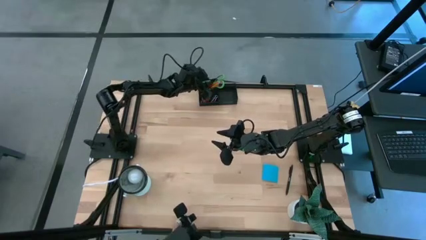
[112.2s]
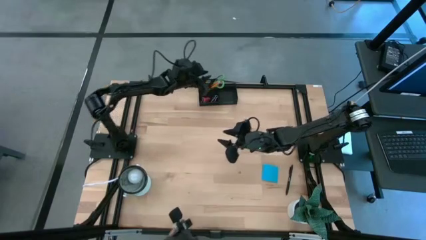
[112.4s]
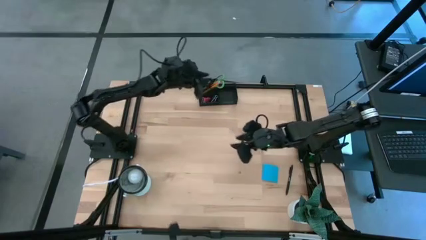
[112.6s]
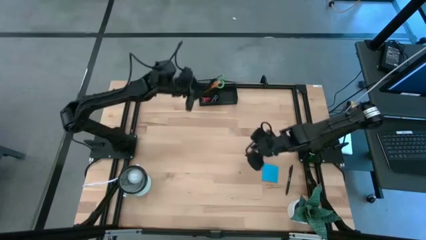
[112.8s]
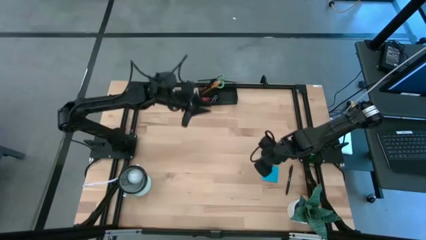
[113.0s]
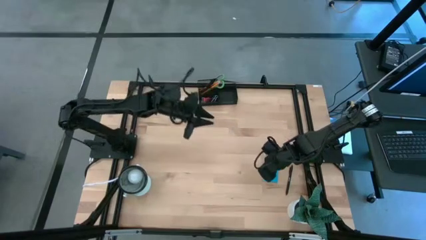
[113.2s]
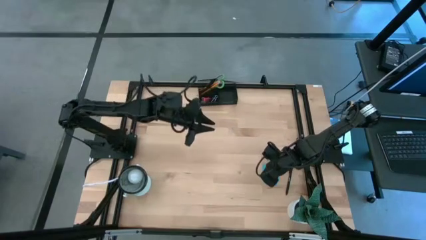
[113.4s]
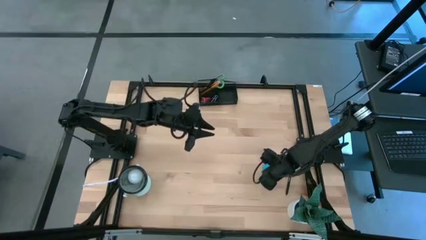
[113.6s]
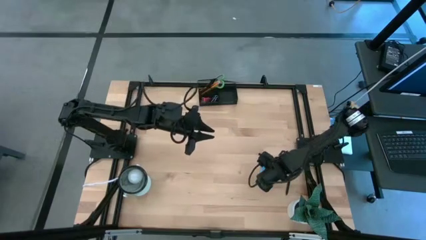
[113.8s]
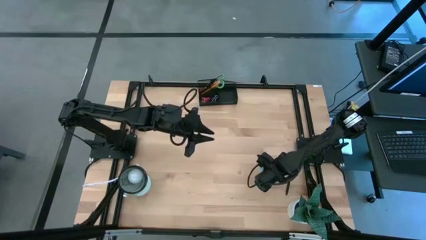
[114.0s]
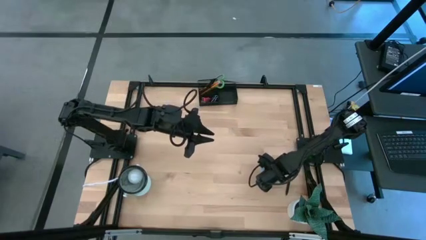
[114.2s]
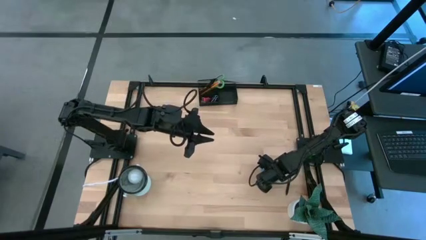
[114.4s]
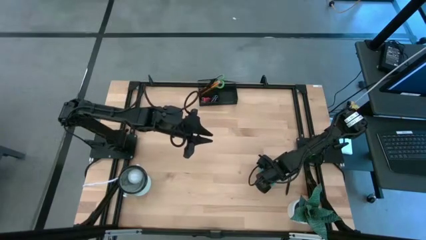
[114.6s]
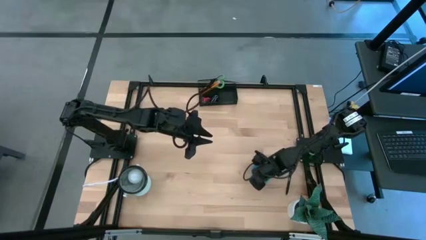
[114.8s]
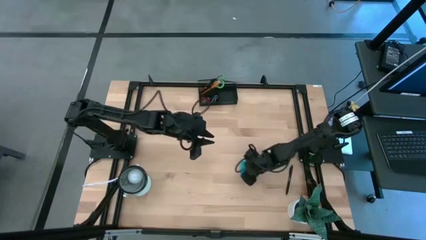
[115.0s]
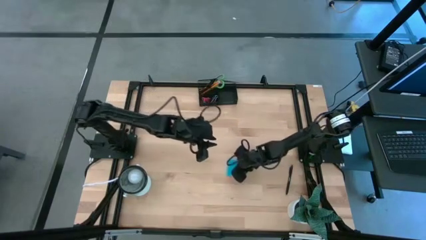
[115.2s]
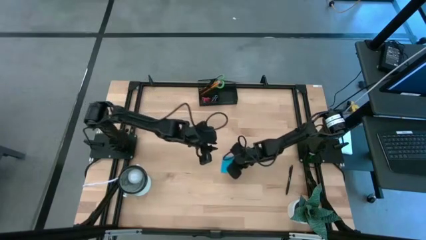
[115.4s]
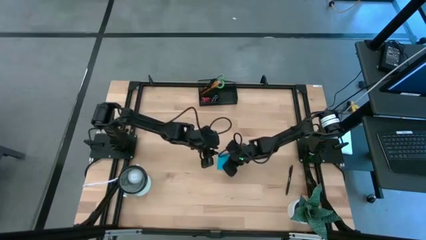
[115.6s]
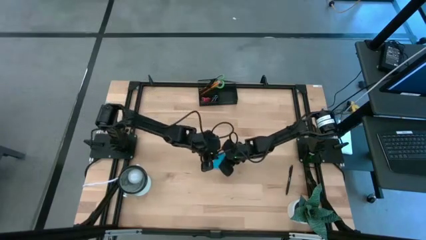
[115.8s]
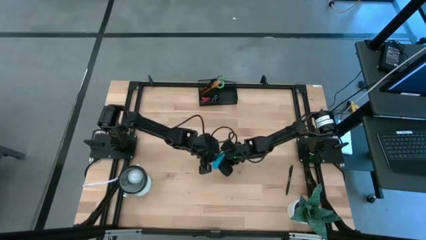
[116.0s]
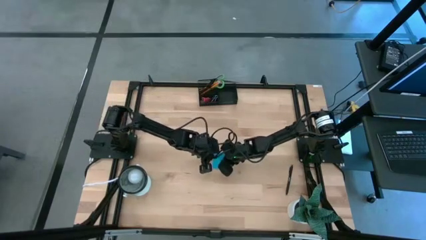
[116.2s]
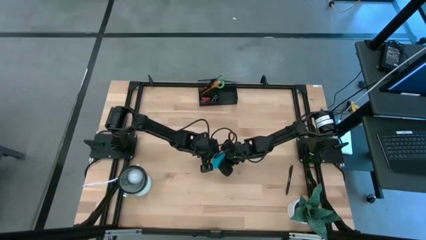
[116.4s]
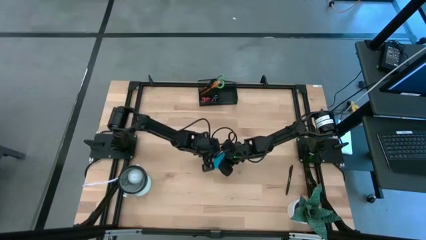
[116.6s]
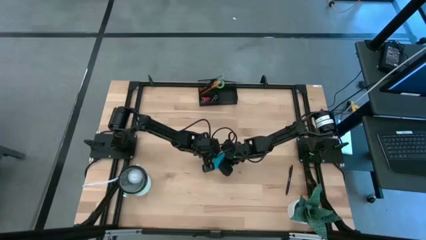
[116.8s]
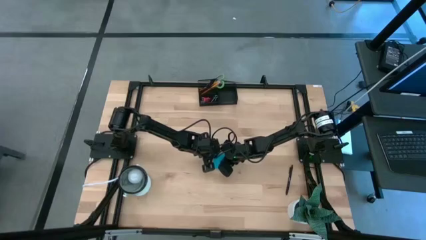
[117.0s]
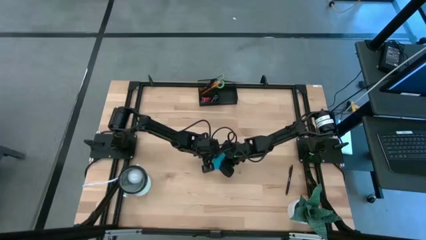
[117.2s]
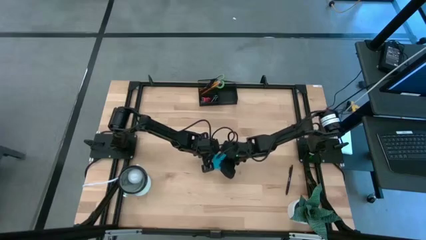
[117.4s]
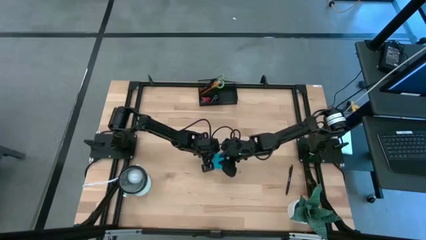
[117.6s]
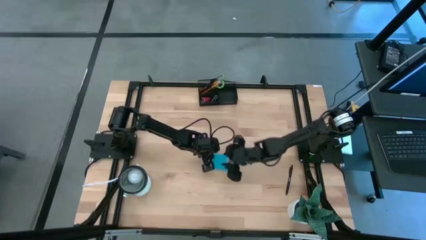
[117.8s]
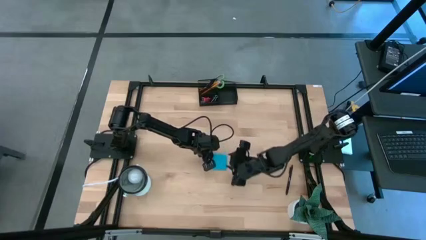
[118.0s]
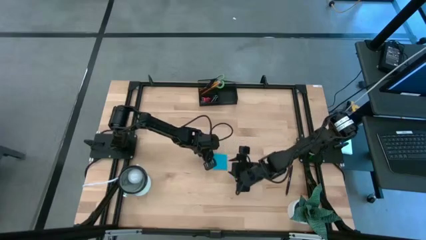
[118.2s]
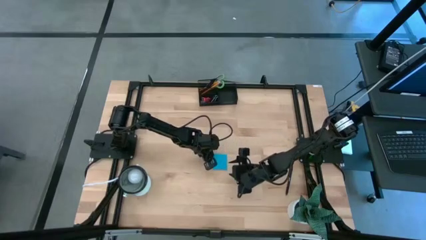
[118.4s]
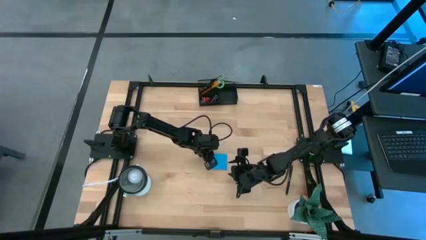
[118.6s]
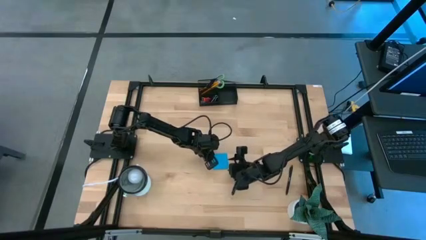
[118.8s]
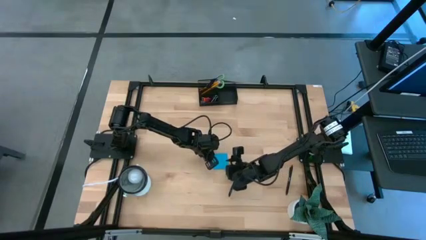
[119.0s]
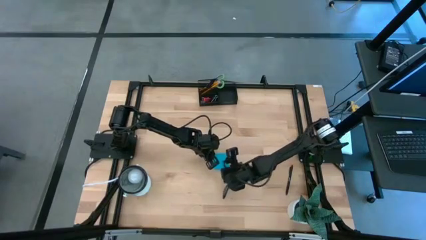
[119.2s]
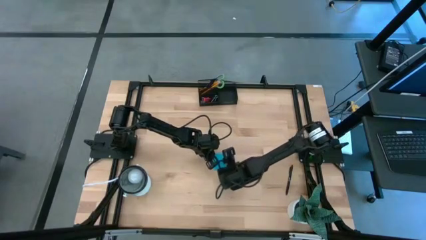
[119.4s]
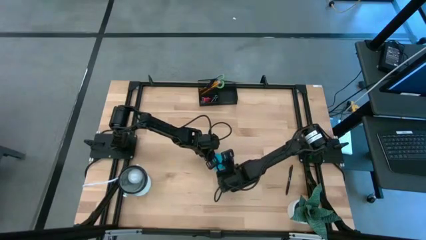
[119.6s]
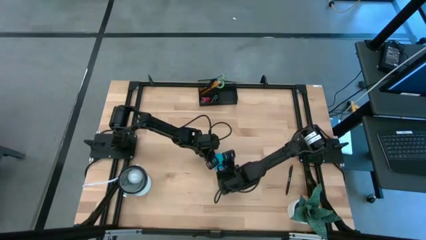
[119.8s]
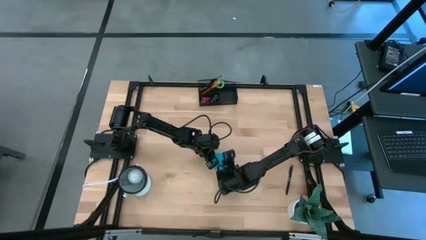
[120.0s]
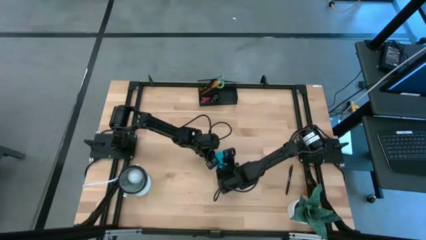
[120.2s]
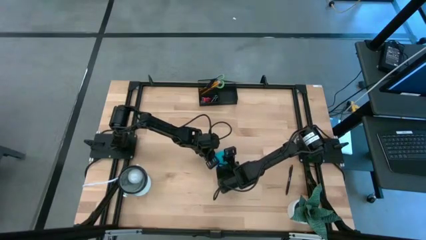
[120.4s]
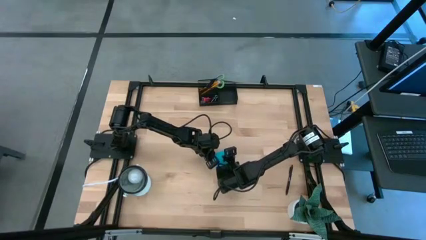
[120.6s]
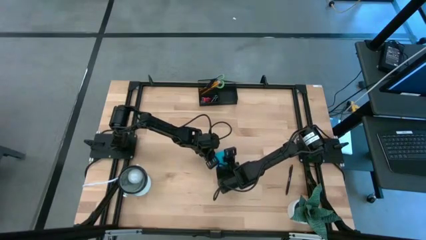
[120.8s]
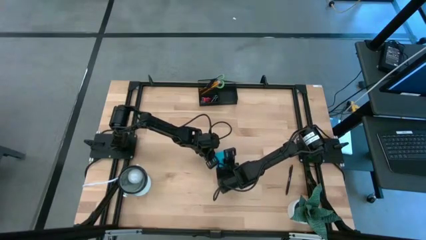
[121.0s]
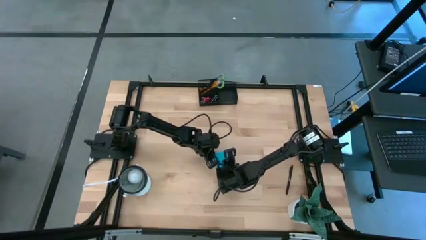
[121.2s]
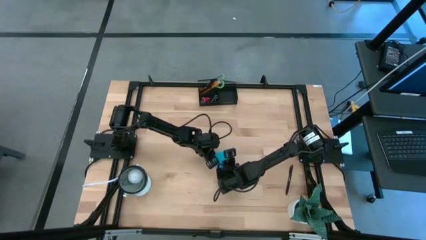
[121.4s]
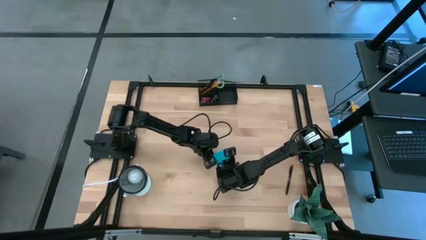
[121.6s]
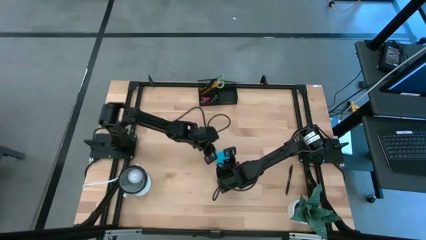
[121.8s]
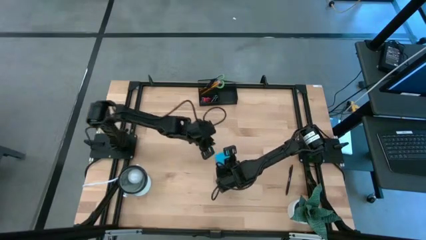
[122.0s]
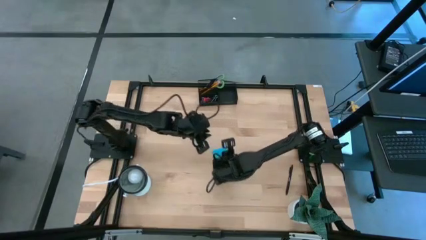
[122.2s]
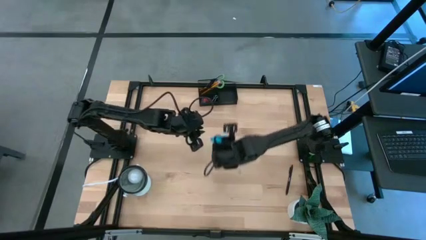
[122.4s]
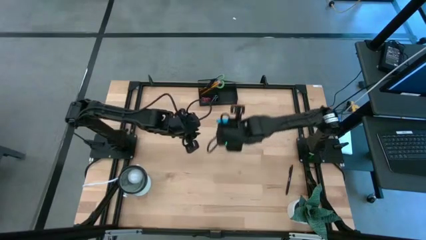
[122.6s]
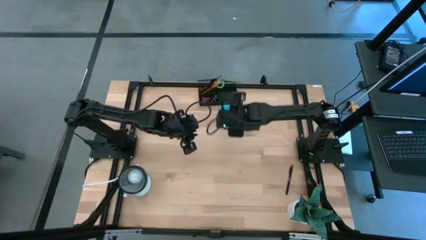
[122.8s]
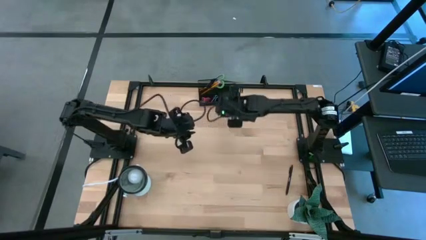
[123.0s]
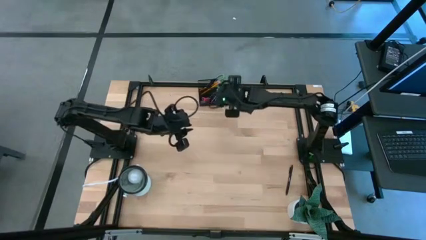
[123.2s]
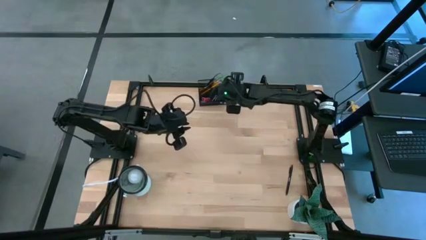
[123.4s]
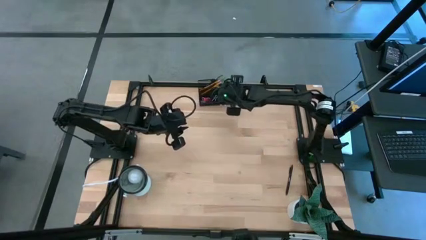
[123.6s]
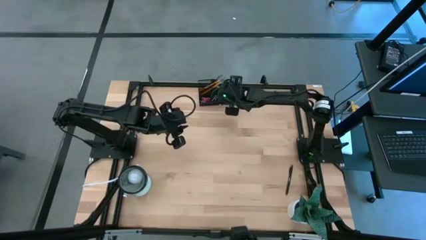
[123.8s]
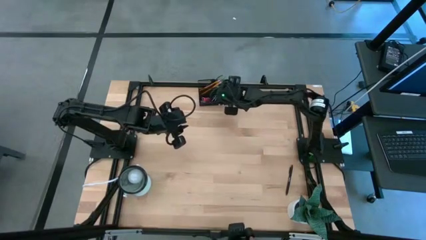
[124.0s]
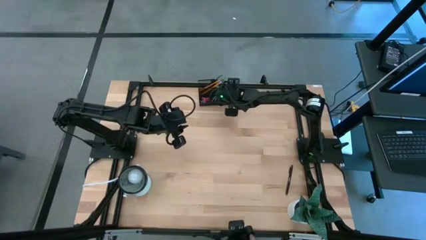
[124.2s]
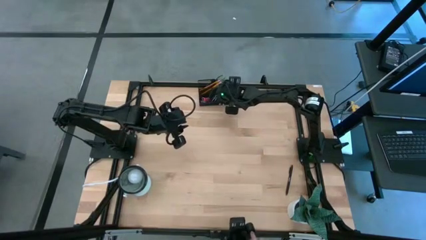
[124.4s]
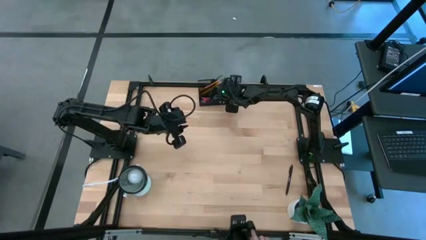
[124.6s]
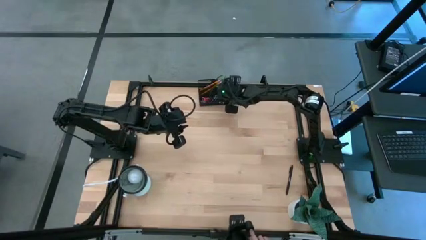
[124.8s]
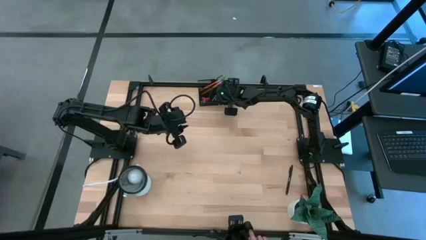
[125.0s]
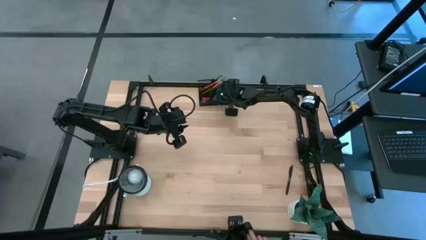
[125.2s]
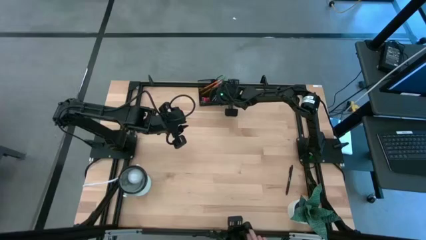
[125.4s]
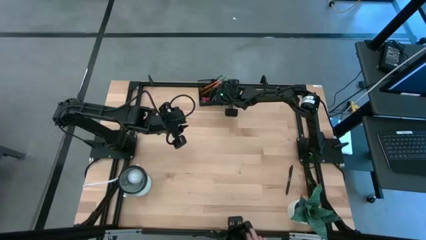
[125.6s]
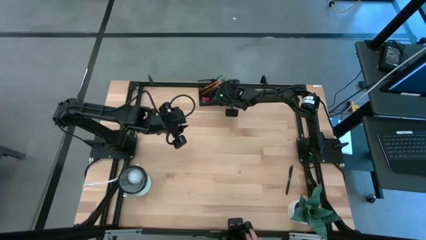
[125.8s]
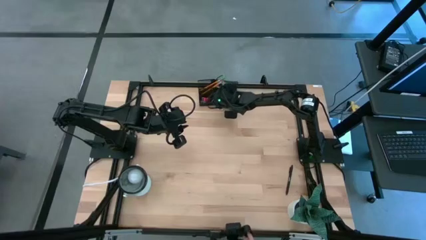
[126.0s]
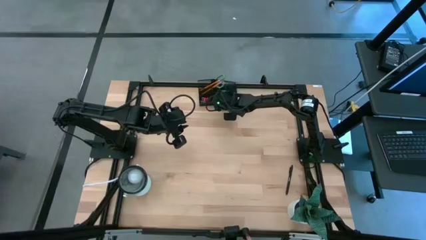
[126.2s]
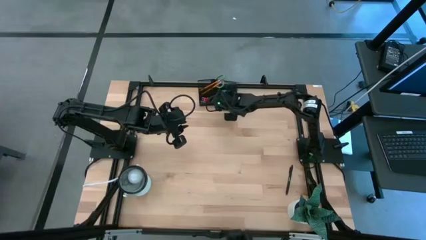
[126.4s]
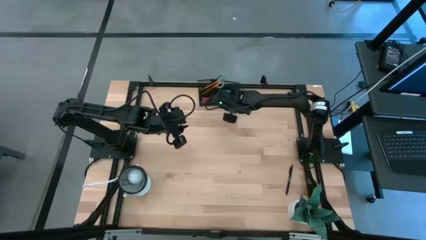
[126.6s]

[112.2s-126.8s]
Task: Pick and place office supplies into organizer
Put the blue sticky note into the desk organizer
